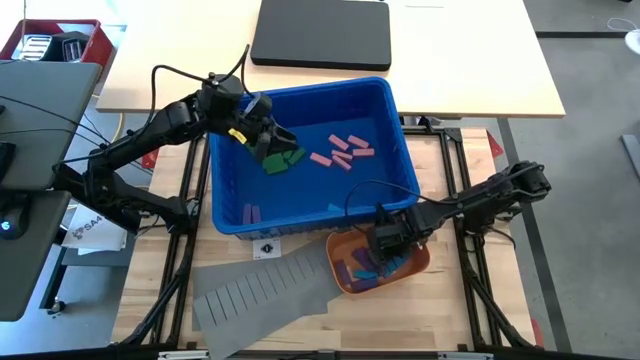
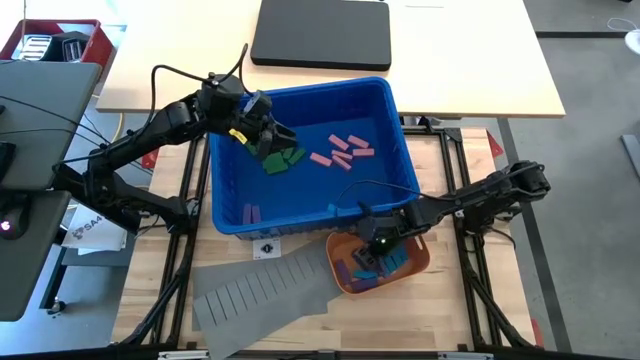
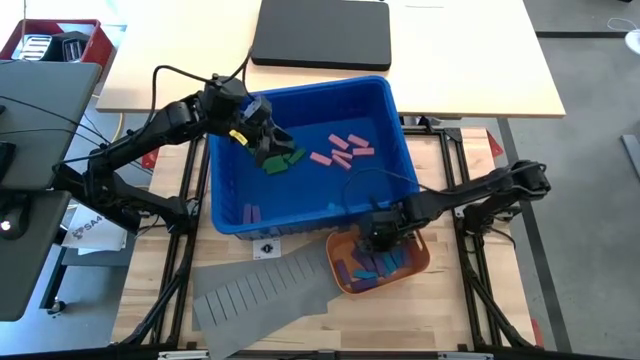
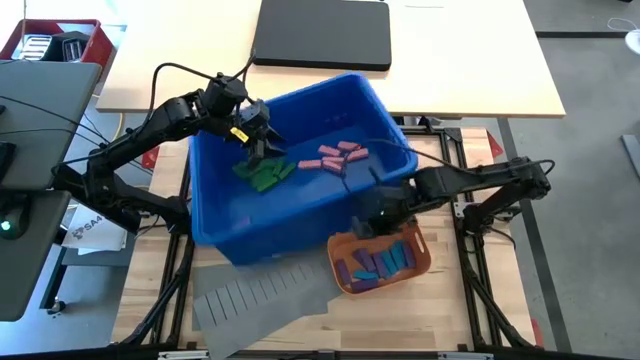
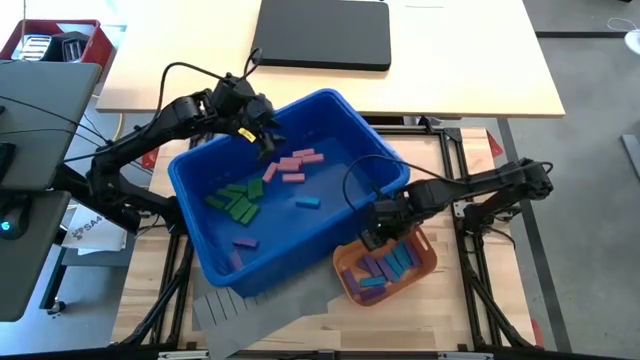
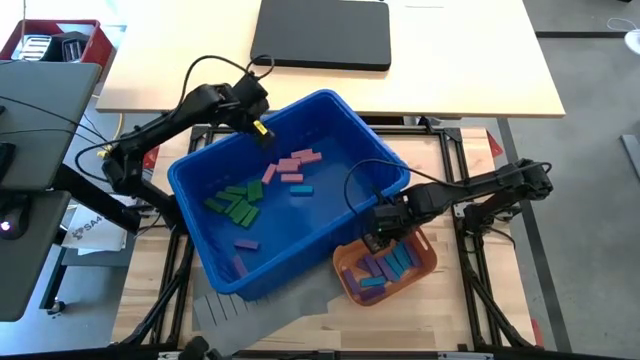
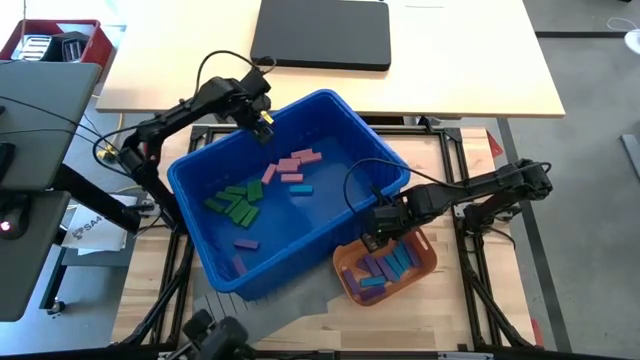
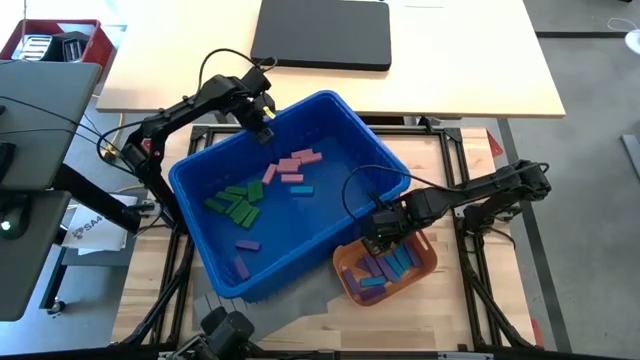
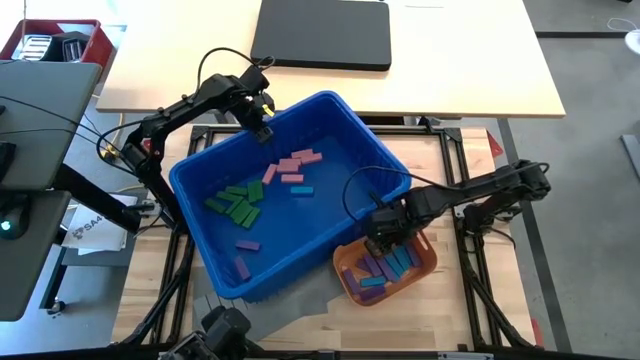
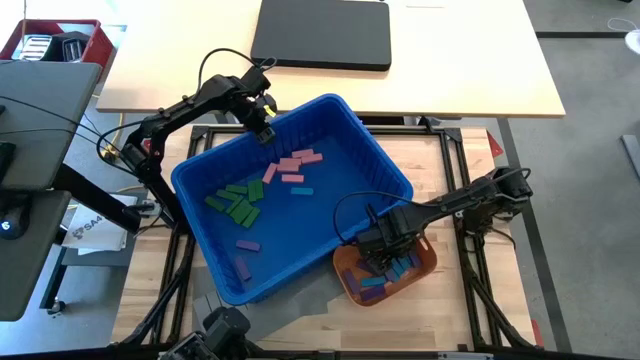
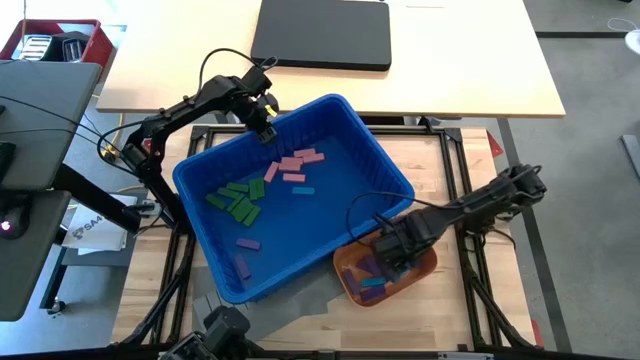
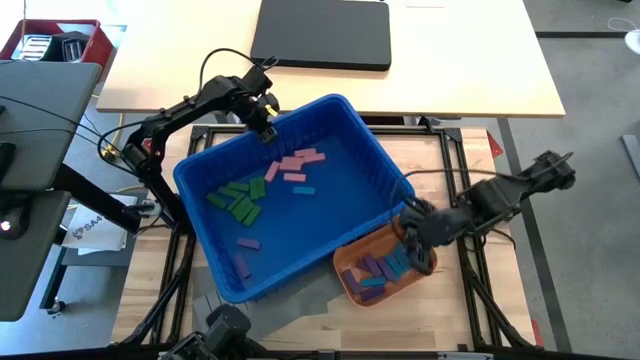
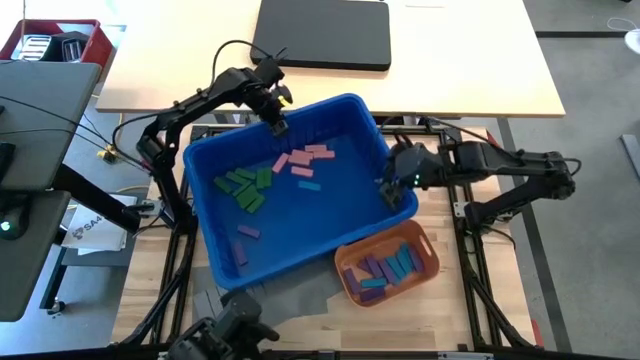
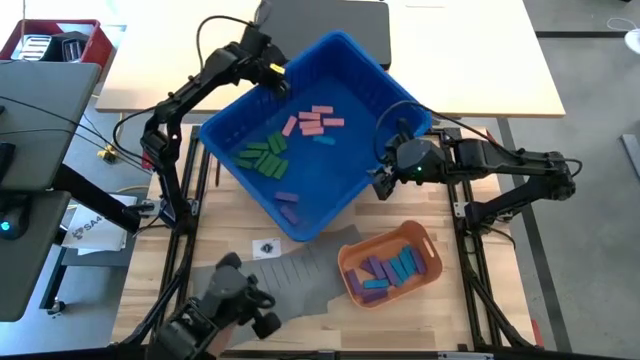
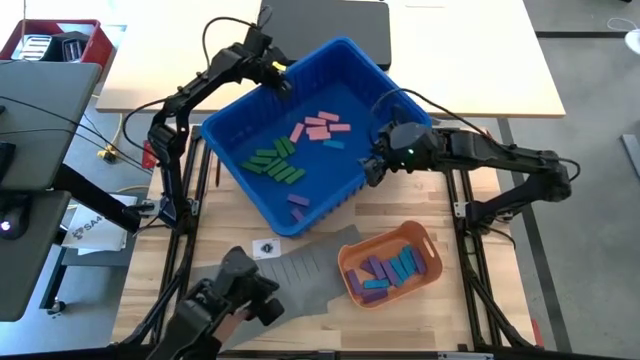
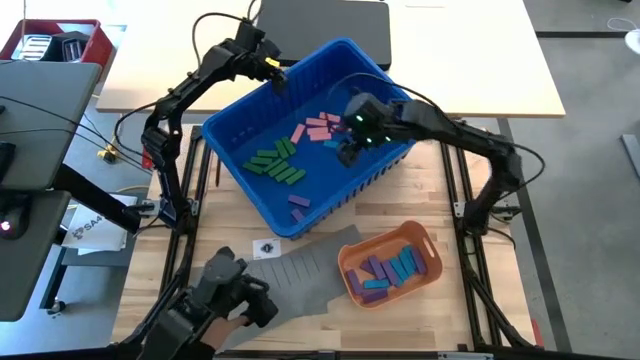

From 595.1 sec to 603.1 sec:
Task: Sort blocks
Adjust the blue bin

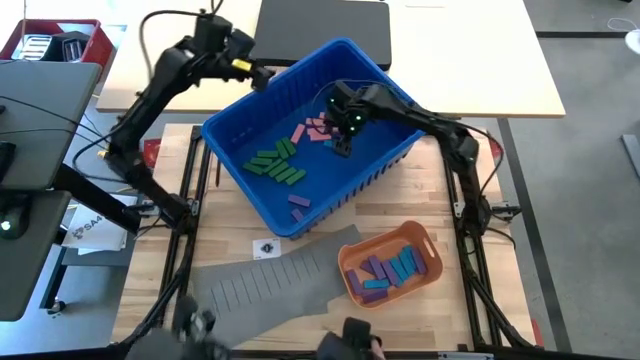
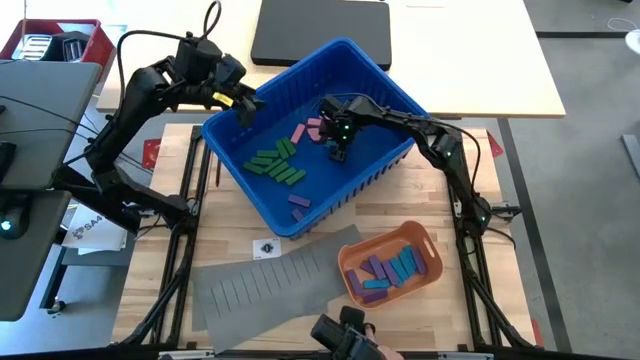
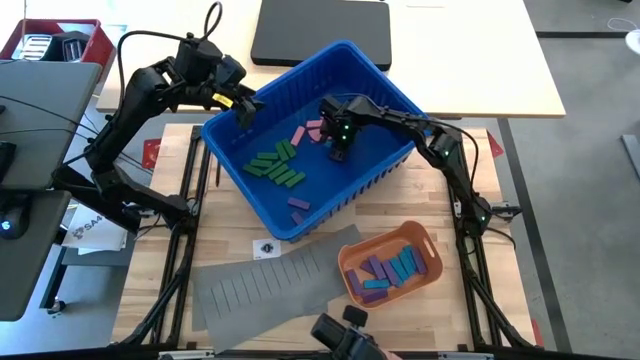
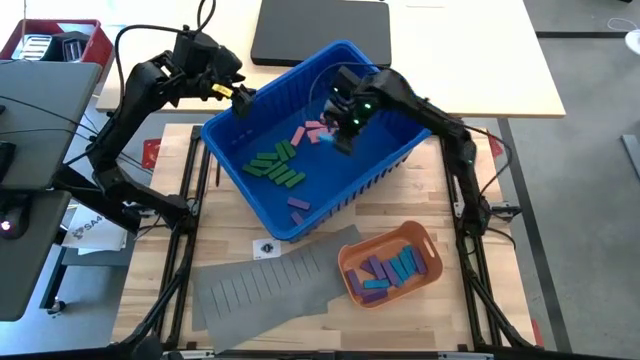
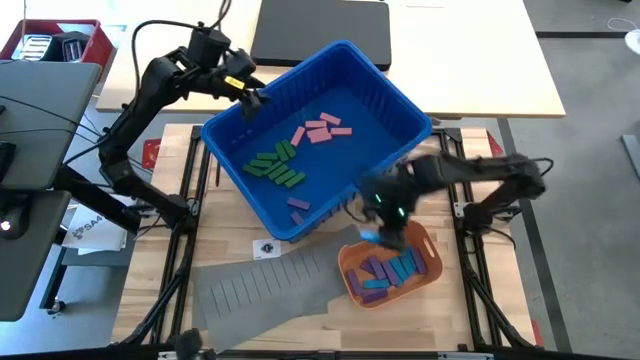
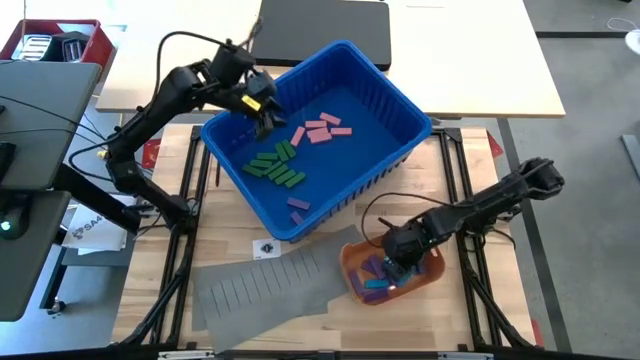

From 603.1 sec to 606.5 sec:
Put the blue block into the orange bin

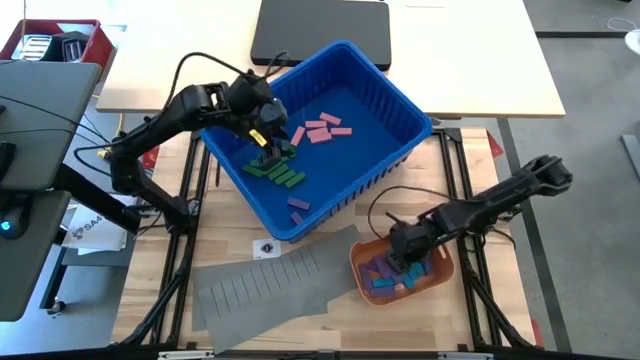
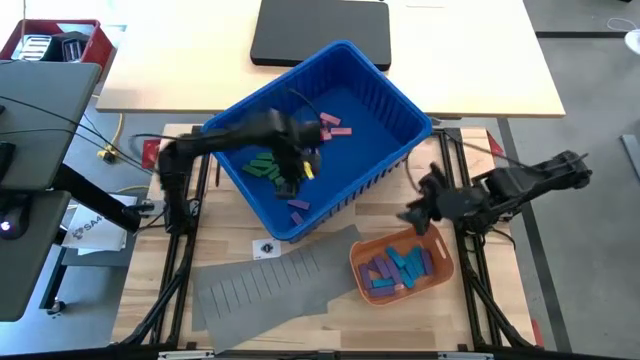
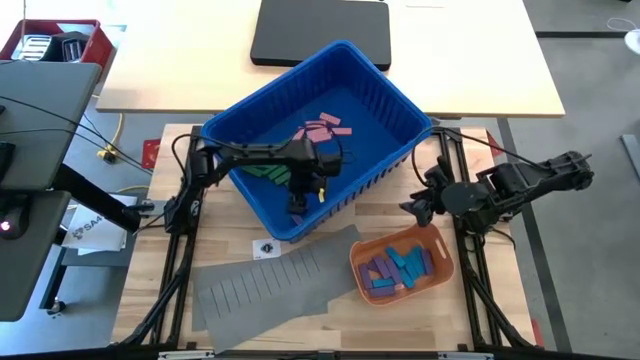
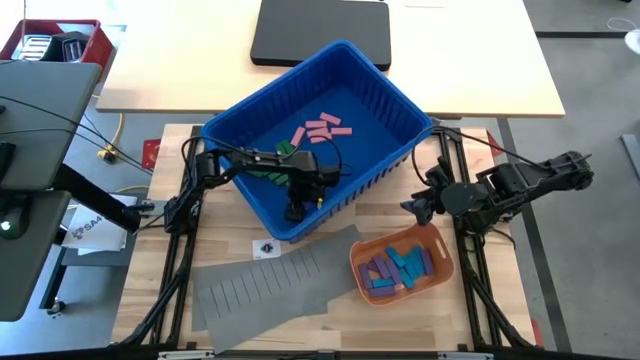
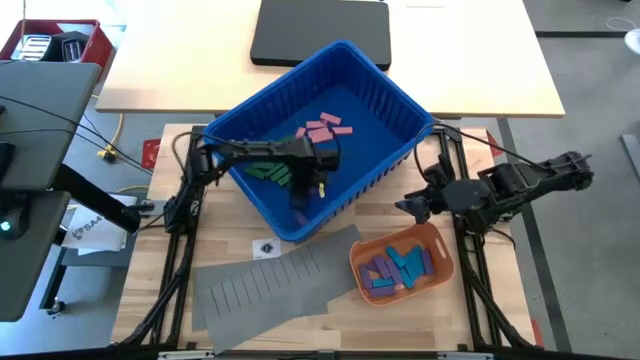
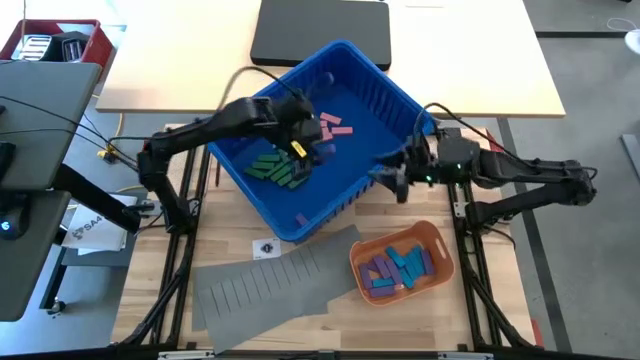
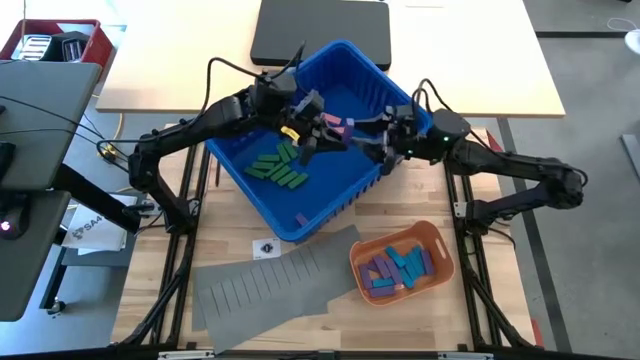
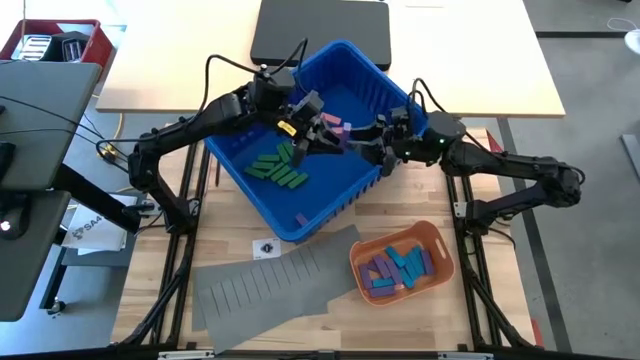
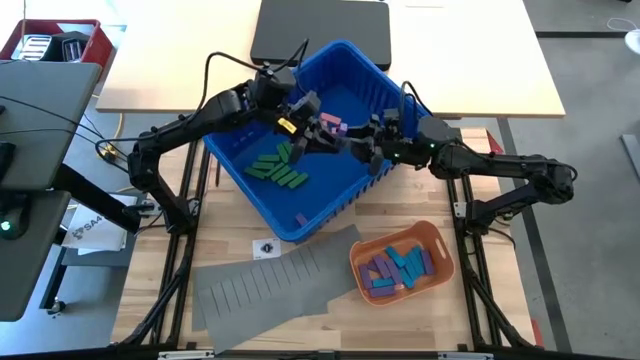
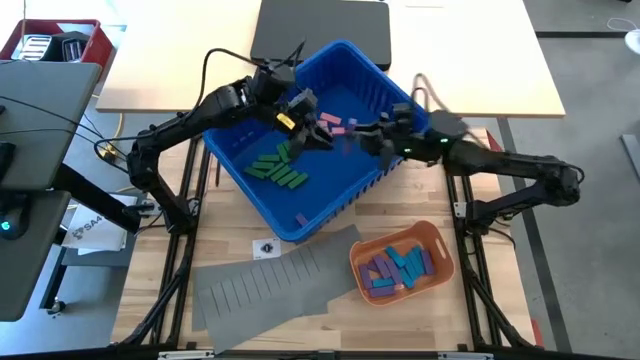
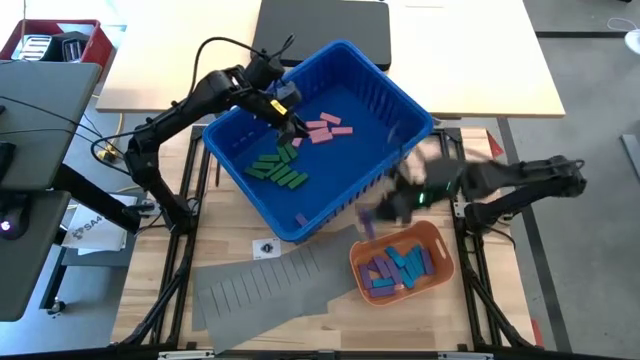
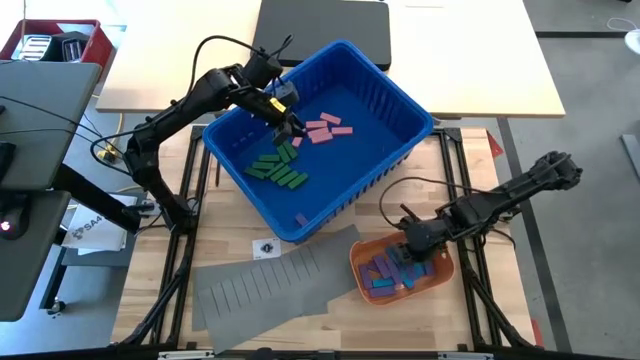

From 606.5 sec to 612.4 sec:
Put the purple block into the orange bin

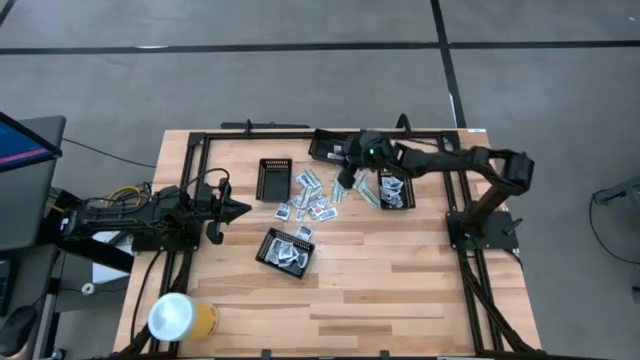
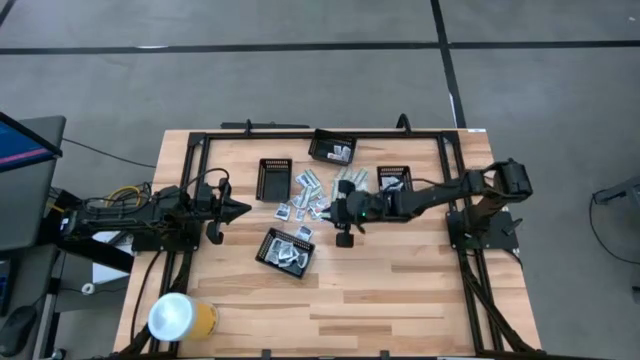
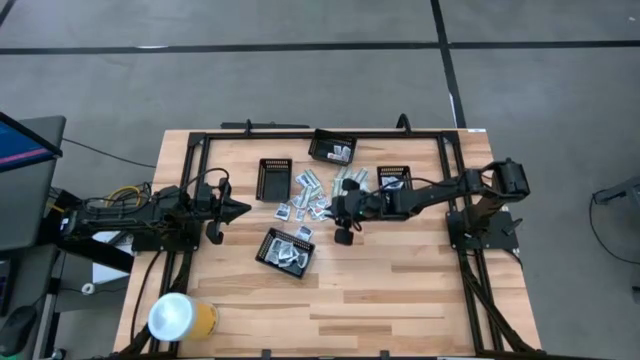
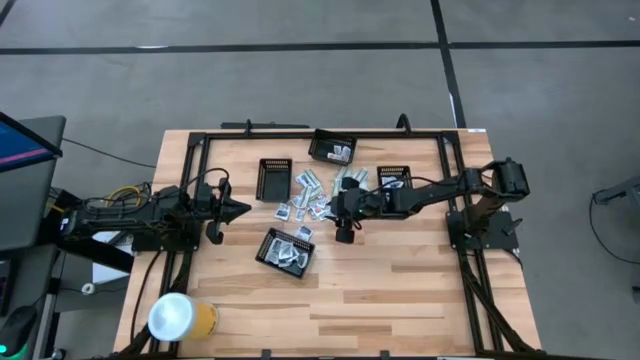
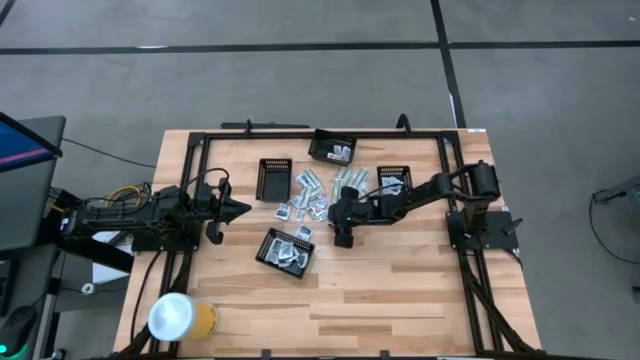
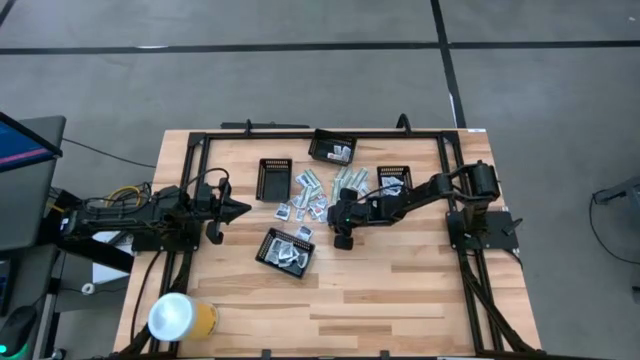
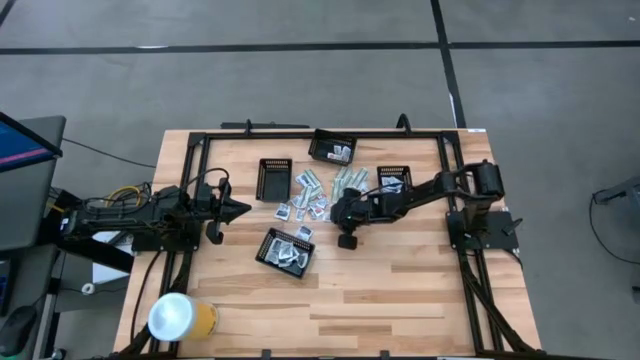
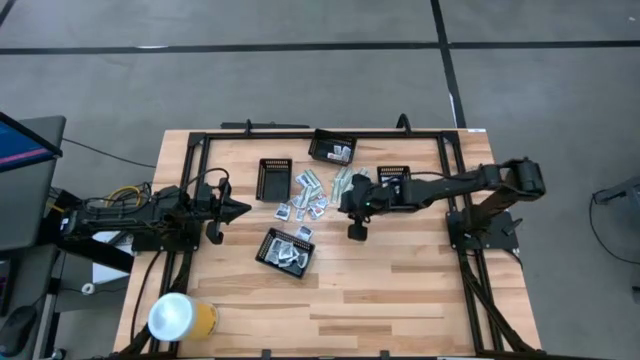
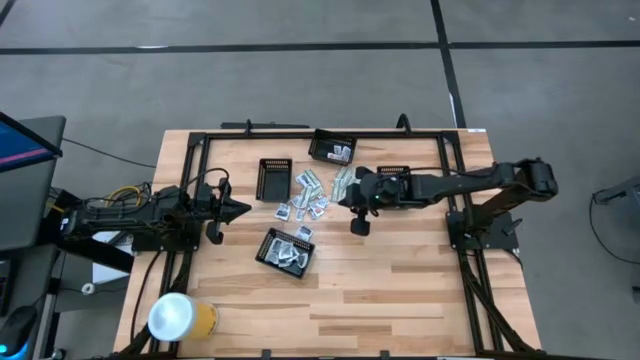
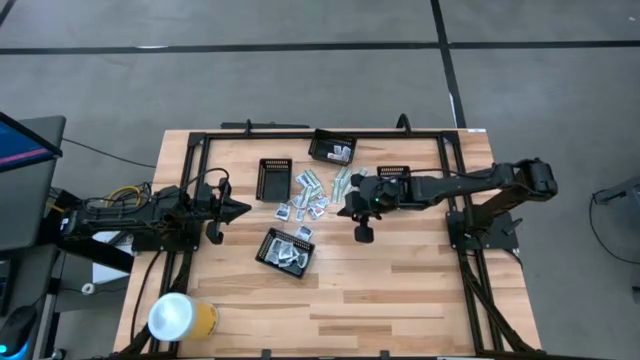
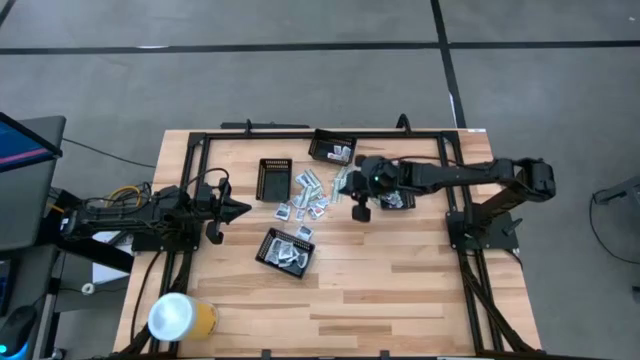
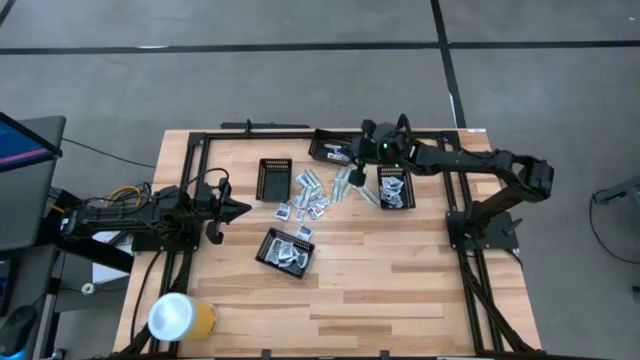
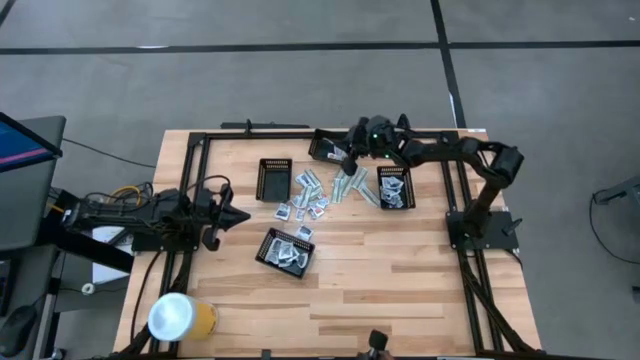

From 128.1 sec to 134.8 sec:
Task: Pick & Place First Aid Supplies
Put the orange ointment pack into the top black bin
